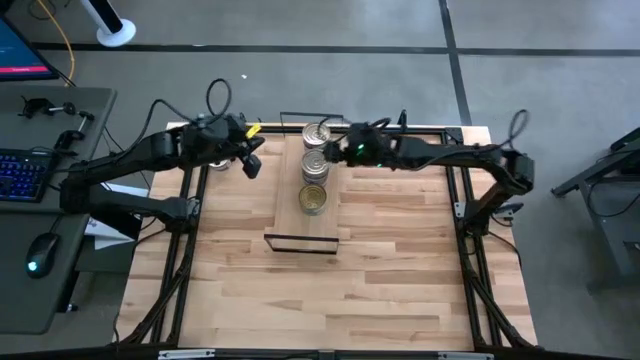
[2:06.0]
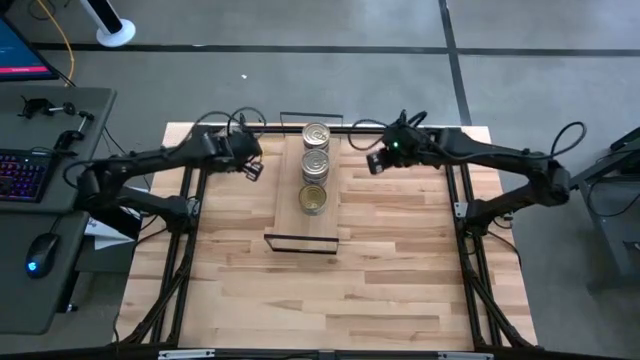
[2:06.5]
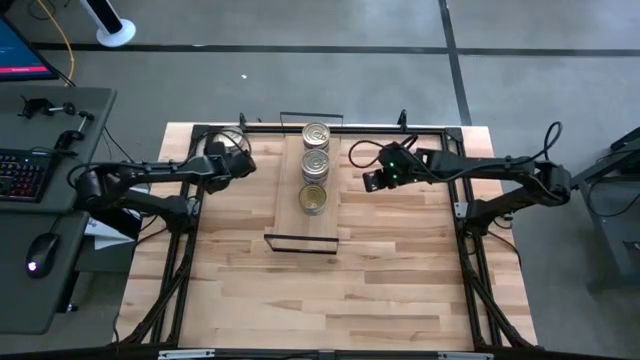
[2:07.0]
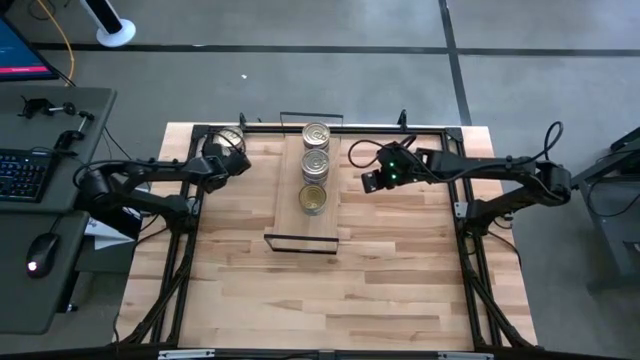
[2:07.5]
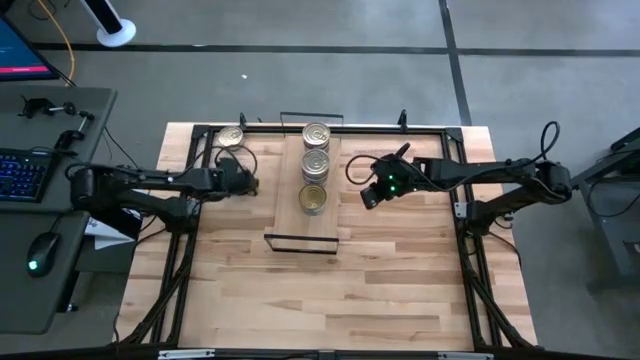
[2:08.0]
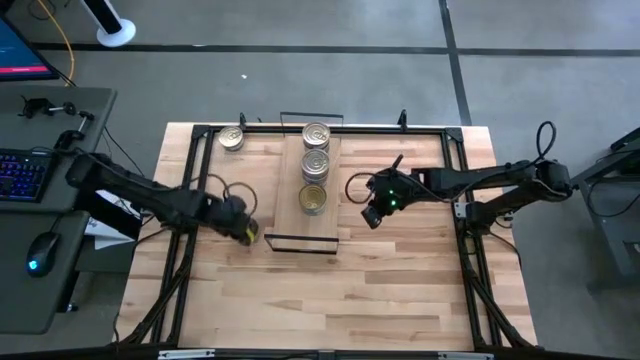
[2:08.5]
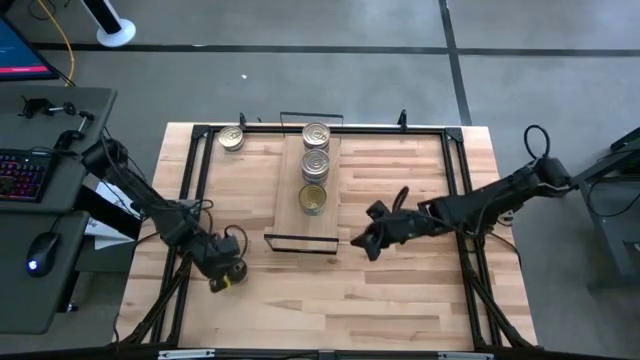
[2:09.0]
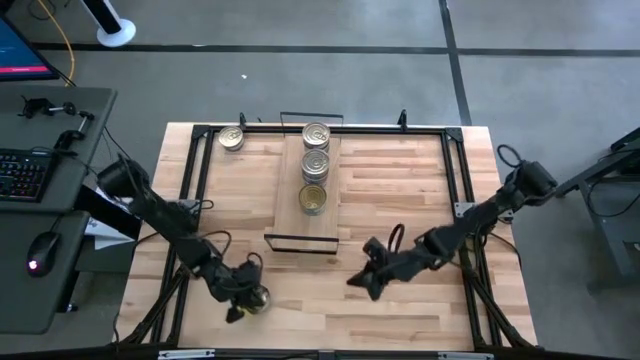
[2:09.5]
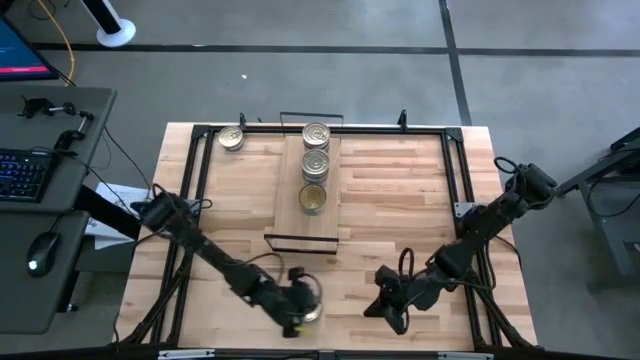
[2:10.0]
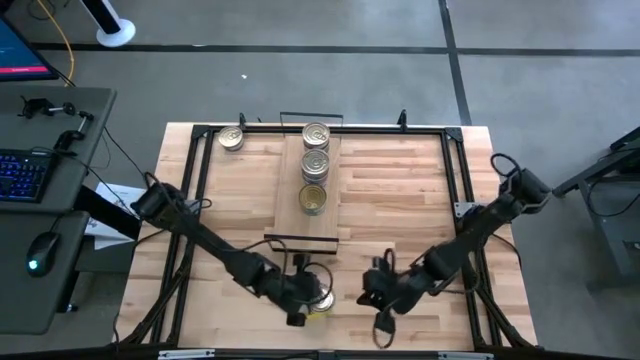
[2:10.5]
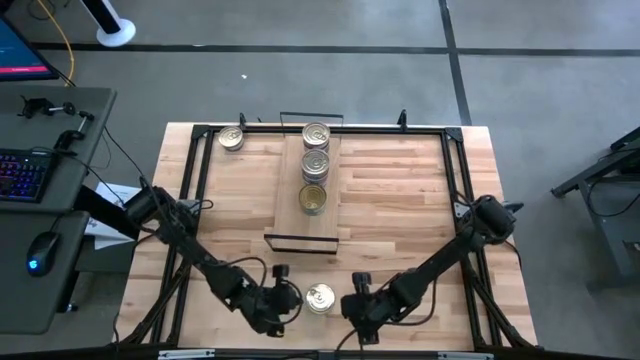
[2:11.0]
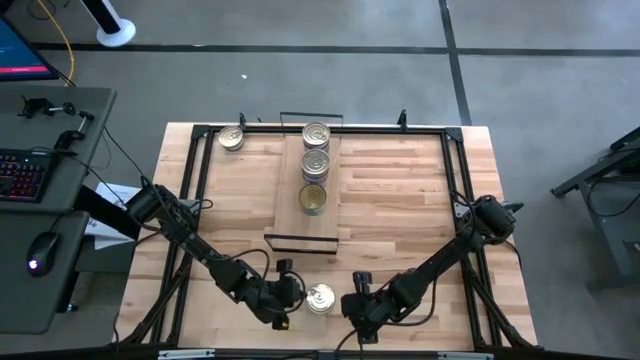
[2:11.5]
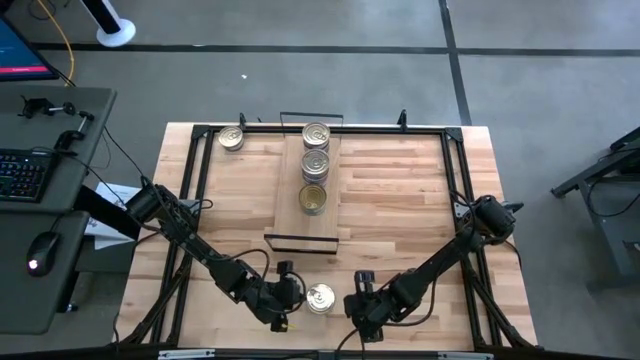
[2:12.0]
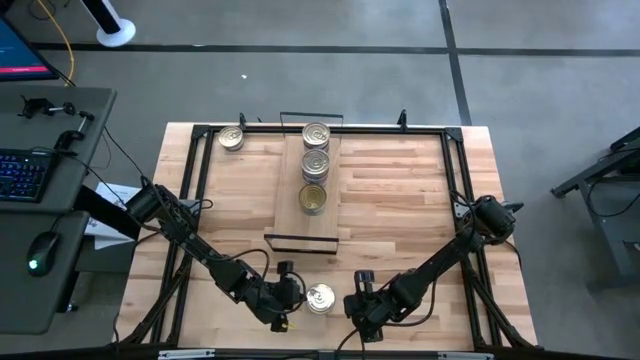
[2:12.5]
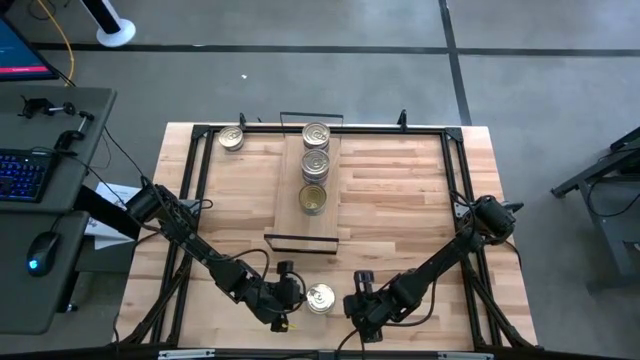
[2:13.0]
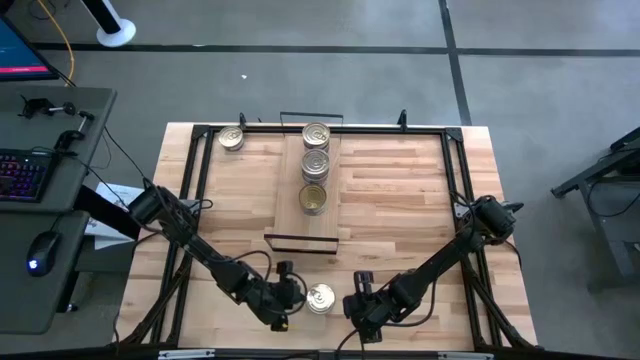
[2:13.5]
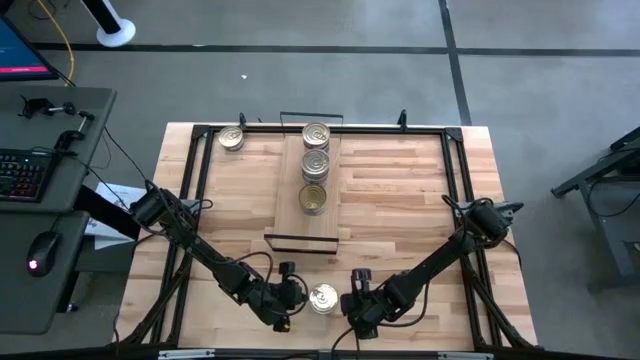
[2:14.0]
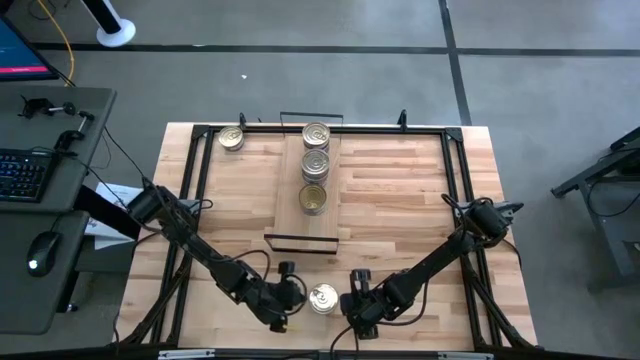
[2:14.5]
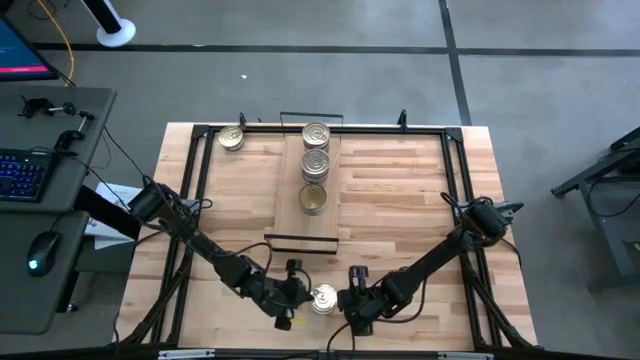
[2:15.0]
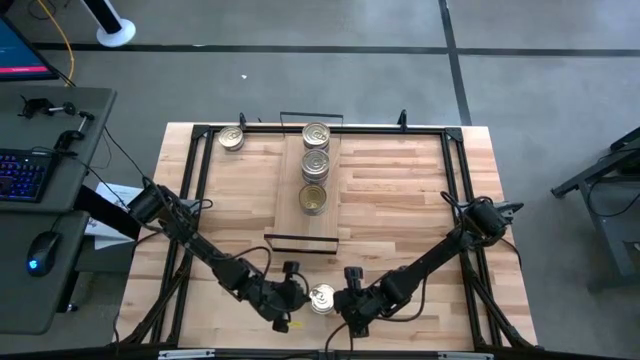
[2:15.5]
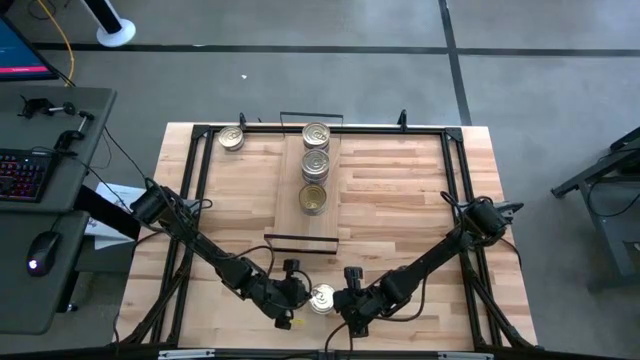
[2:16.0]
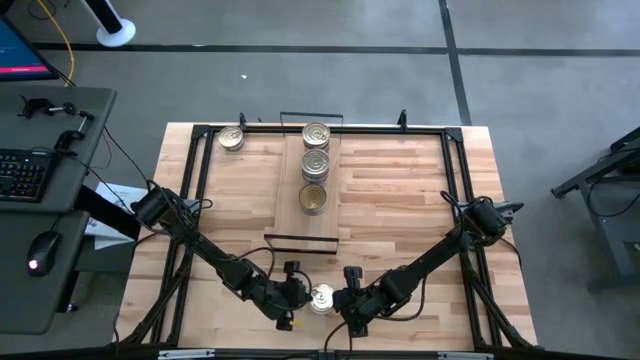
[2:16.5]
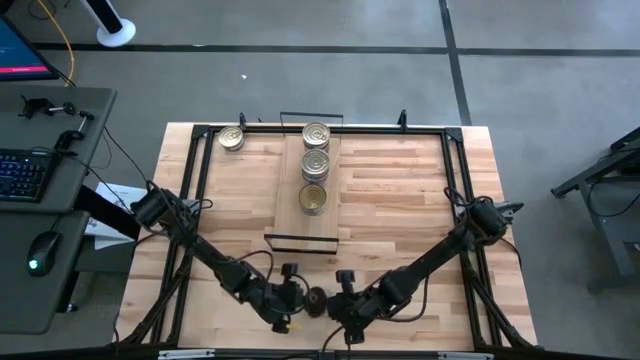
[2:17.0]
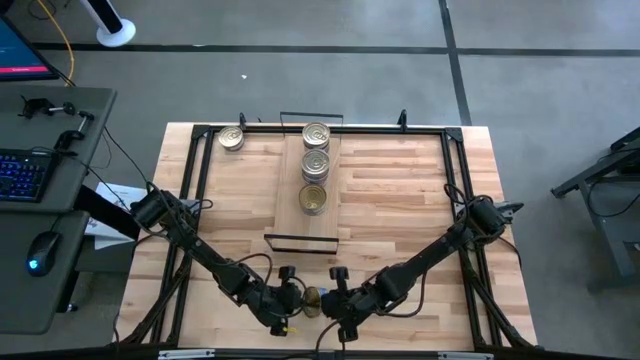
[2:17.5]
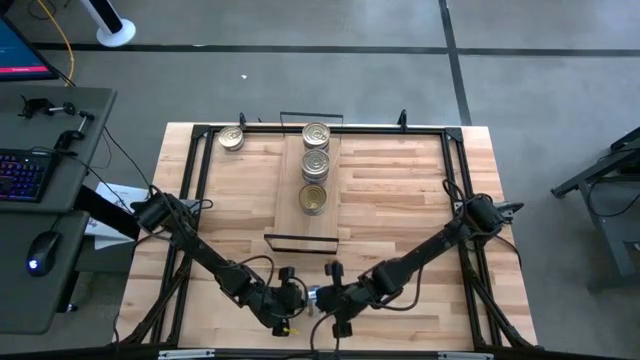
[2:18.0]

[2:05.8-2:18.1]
Task: Stack canned seafood by type on shelf
Stack the blue pink tuna can on top of the other blue pink tuna cans on the shelf

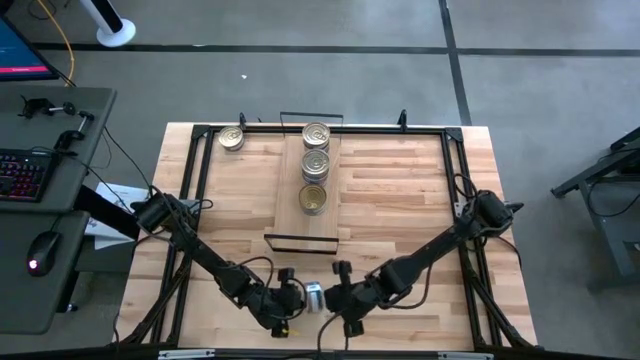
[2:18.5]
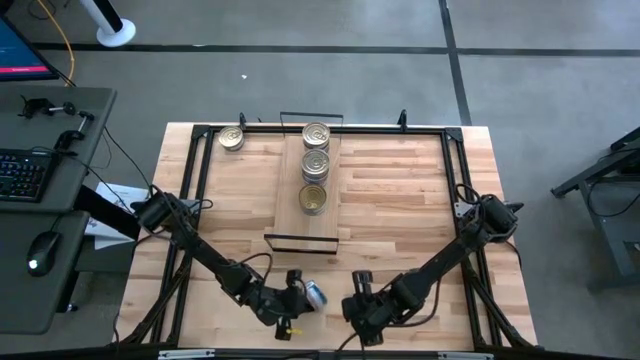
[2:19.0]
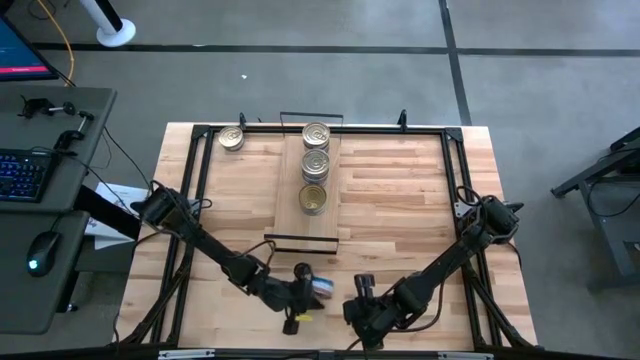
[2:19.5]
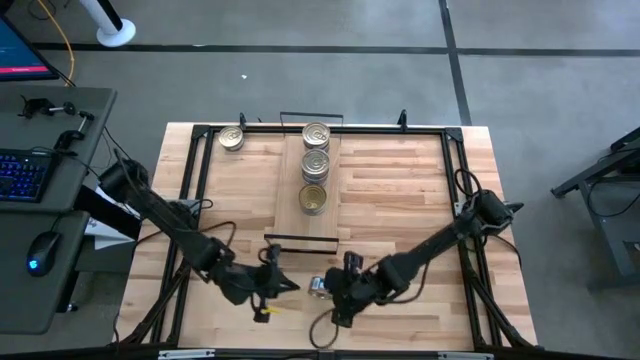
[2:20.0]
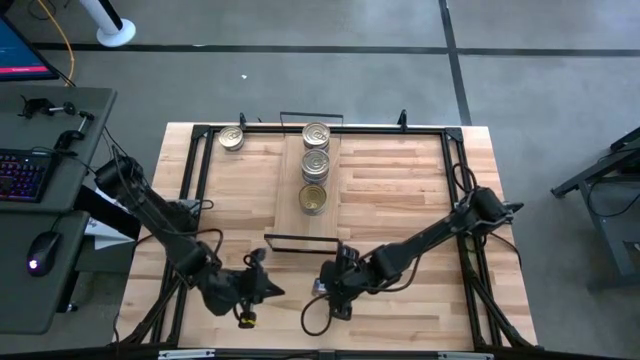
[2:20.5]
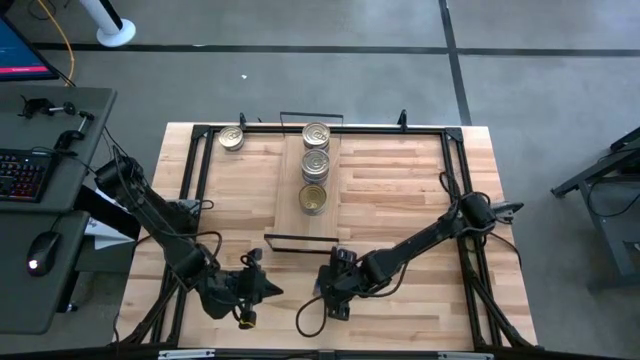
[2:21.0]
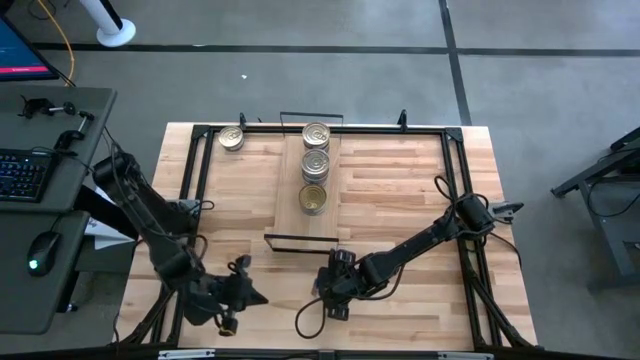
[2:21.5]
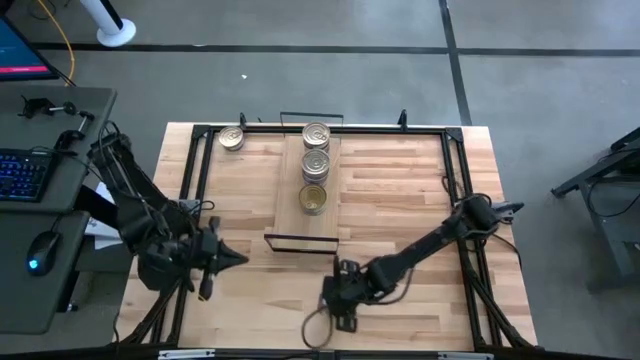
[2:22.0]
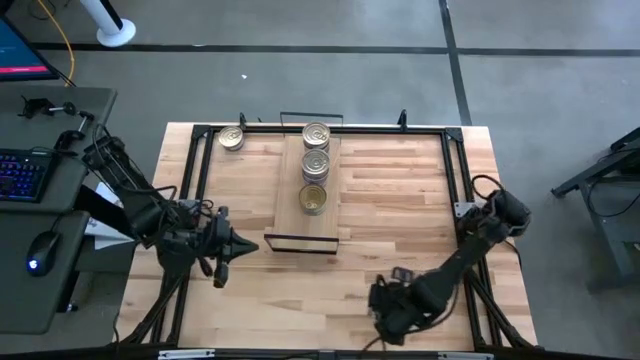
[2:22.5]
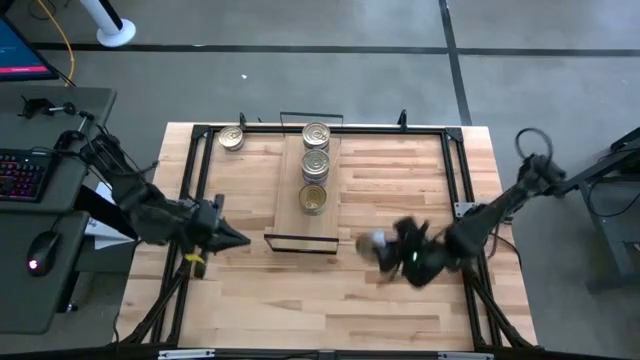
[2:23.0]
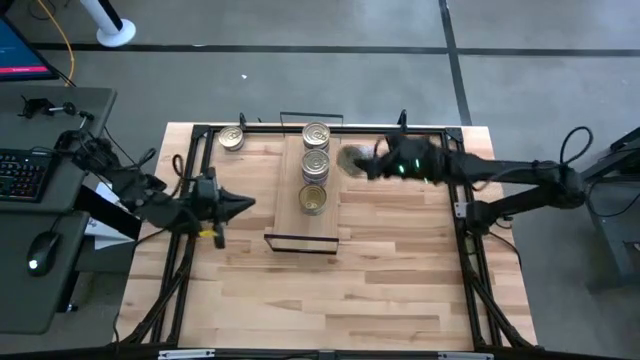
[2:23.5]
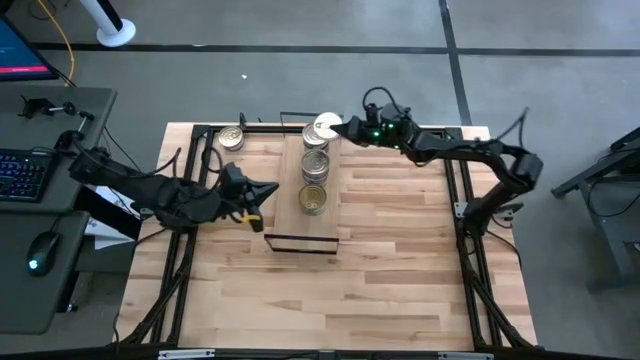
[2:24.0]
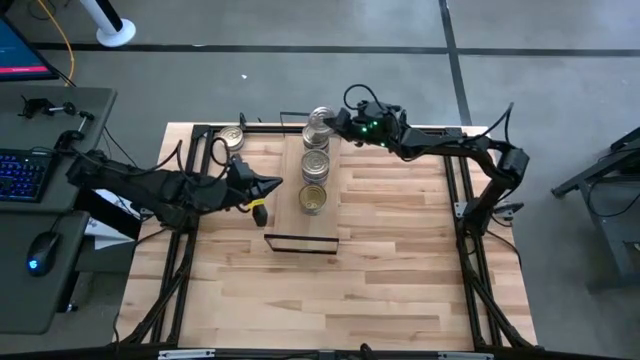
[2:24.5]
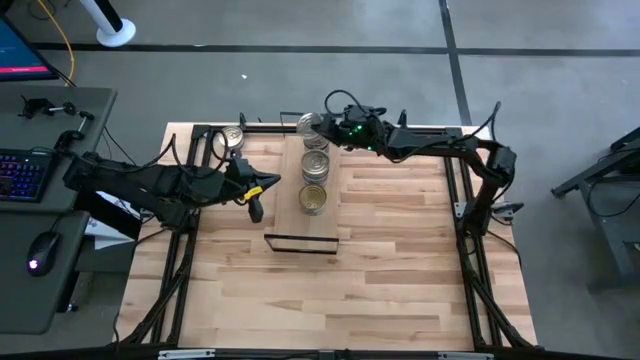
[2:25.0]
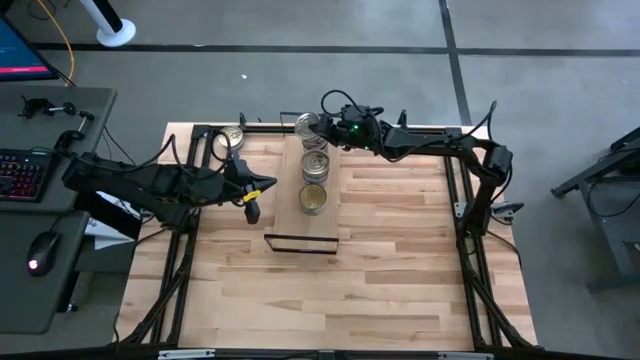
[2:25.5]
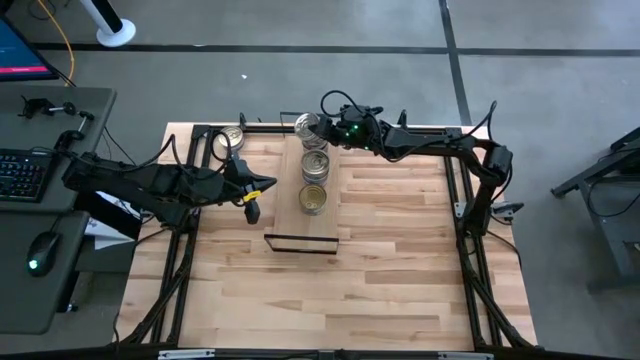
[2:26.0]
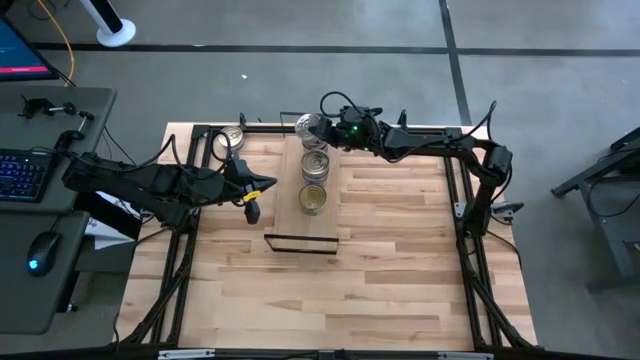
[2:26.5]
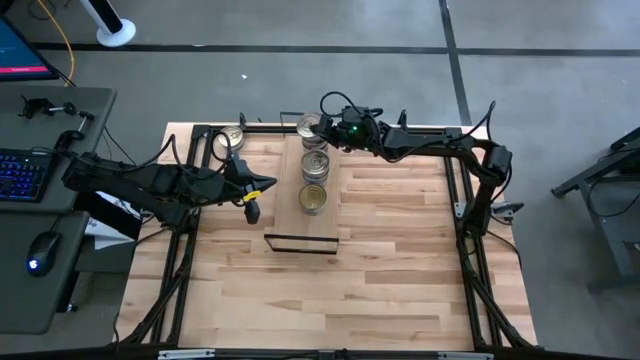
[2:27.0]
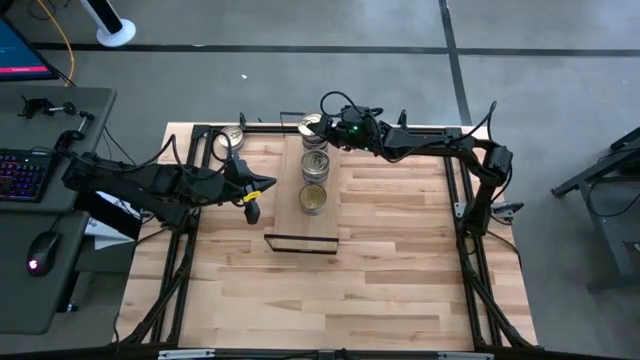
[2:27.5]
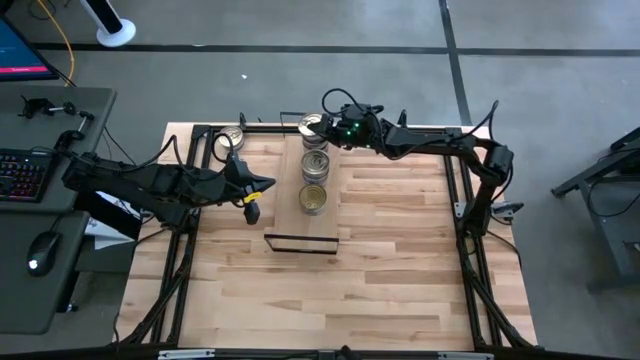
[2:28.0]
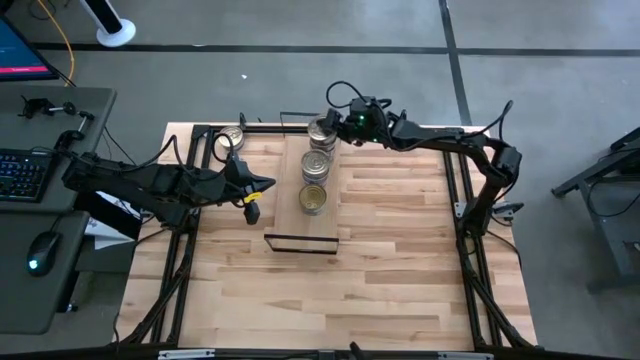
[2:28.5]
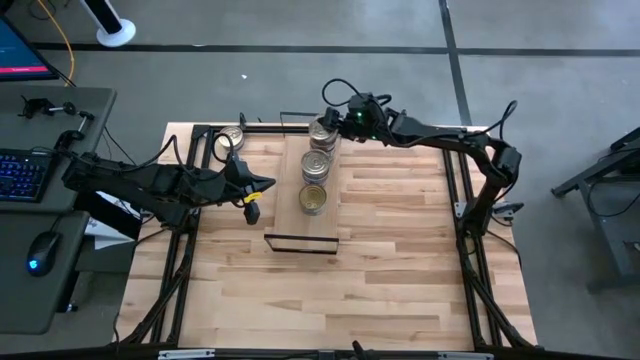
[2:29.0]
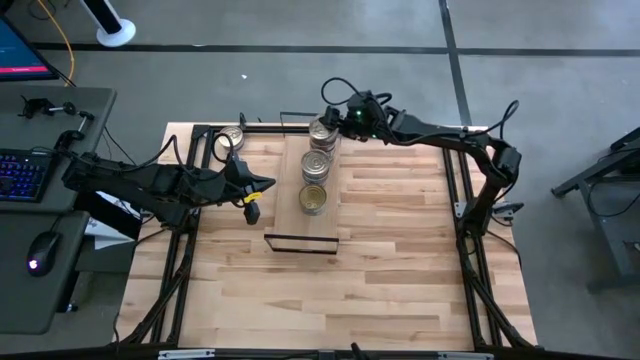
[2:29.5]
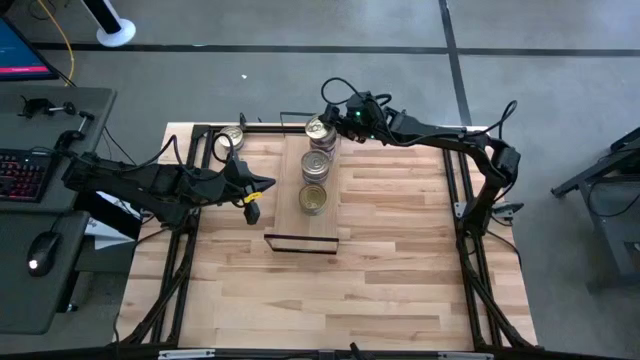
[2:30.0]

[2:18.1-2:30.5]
Stack the blue pink tuna can on top of the other blue pink tuna cans on the shelf
